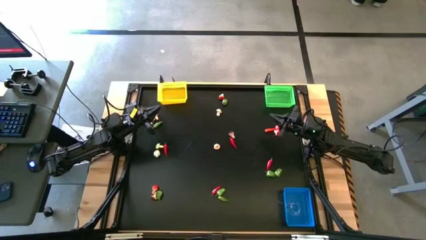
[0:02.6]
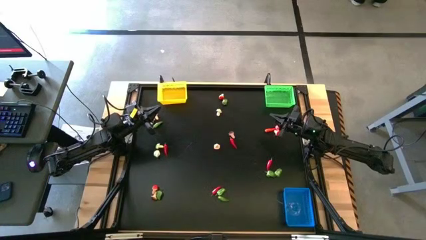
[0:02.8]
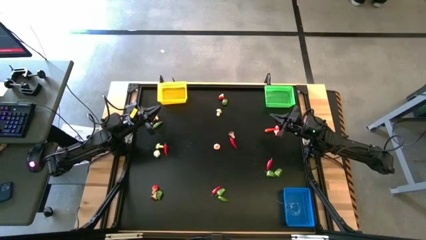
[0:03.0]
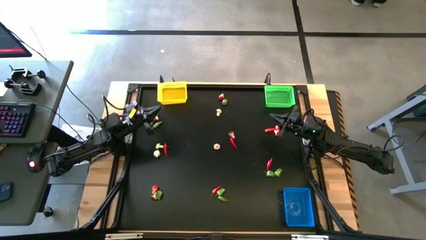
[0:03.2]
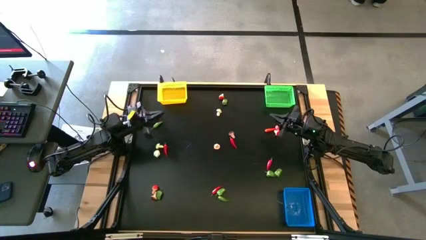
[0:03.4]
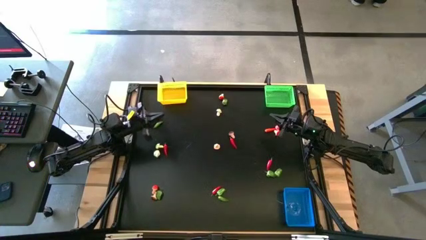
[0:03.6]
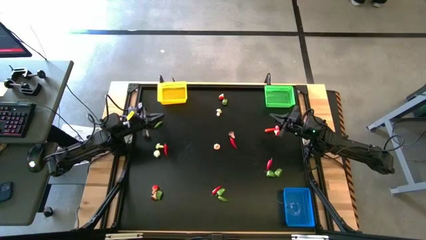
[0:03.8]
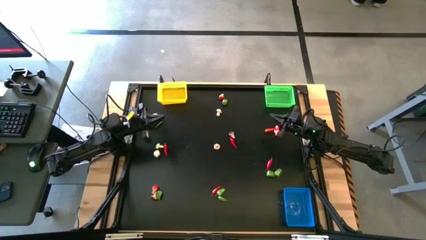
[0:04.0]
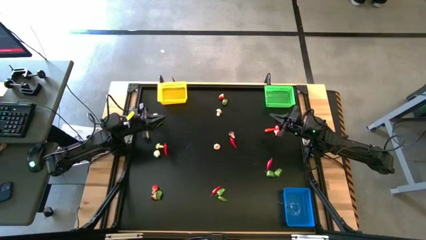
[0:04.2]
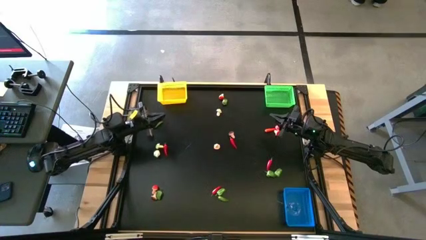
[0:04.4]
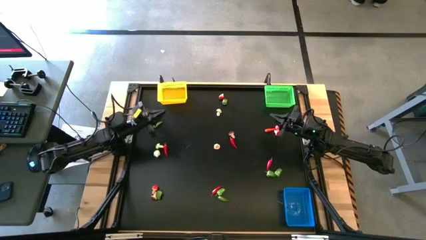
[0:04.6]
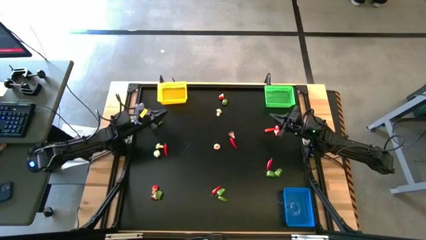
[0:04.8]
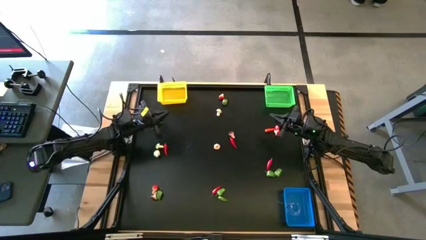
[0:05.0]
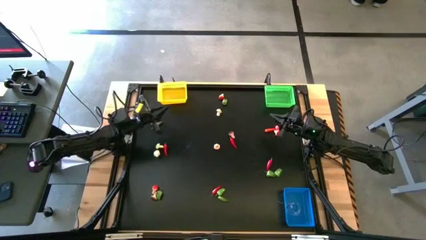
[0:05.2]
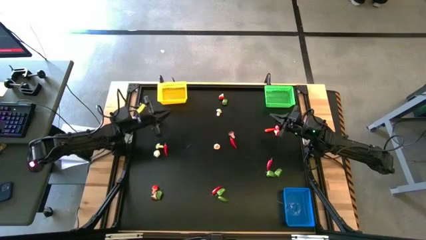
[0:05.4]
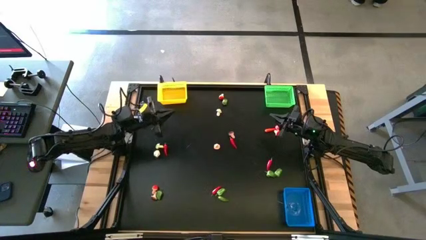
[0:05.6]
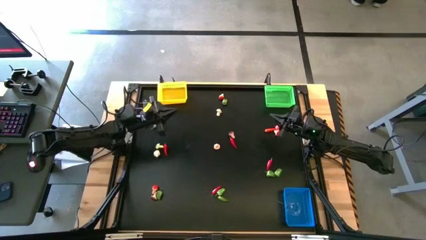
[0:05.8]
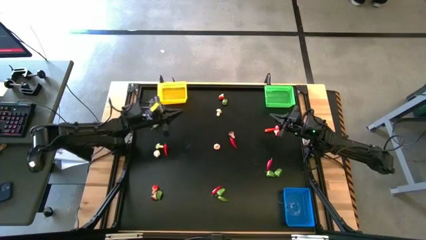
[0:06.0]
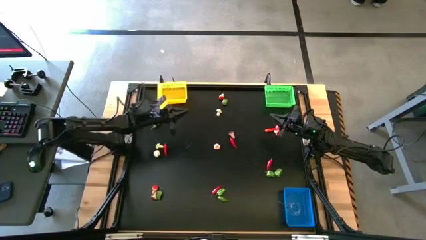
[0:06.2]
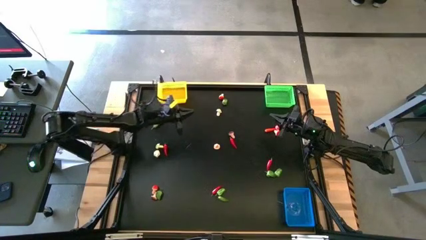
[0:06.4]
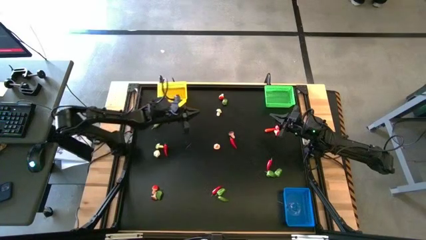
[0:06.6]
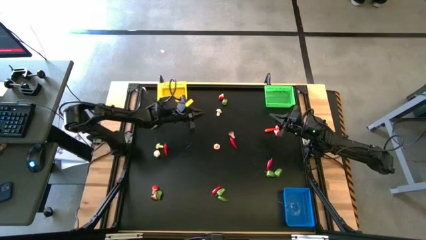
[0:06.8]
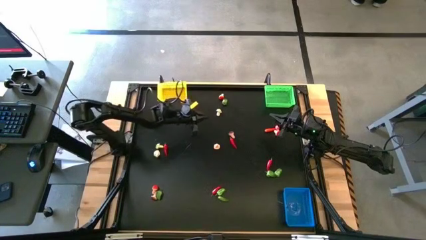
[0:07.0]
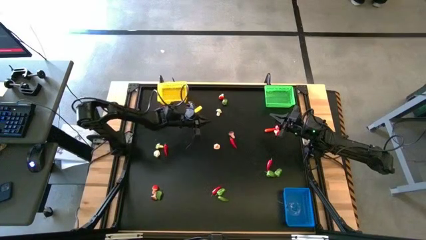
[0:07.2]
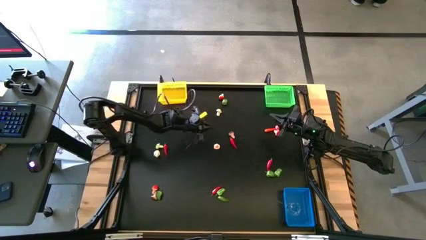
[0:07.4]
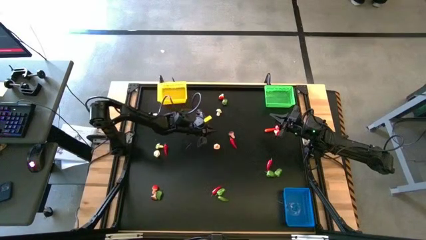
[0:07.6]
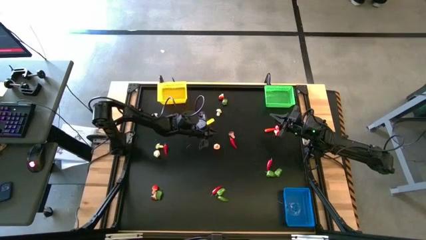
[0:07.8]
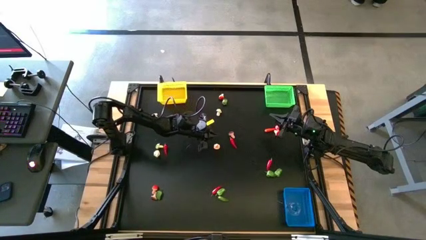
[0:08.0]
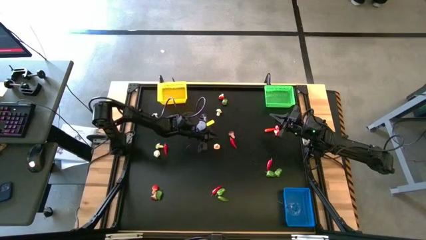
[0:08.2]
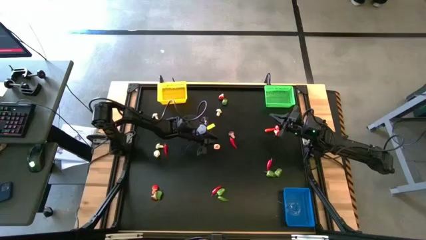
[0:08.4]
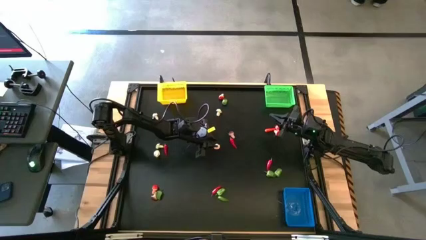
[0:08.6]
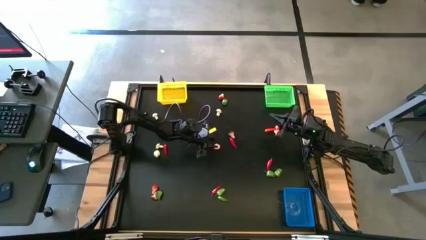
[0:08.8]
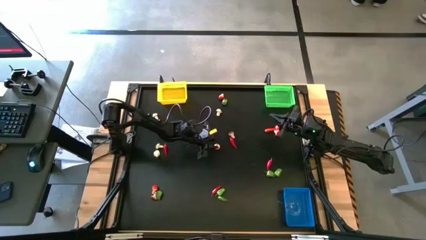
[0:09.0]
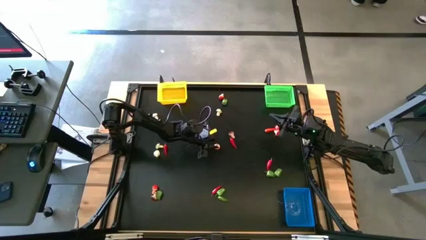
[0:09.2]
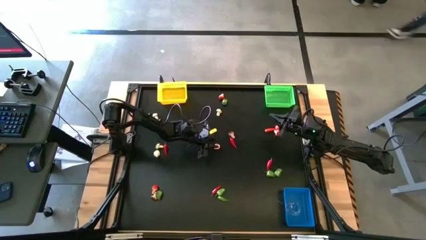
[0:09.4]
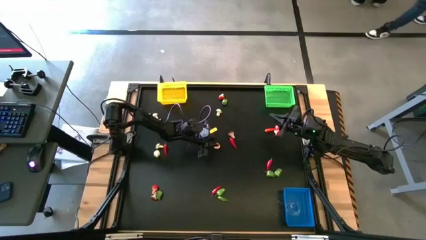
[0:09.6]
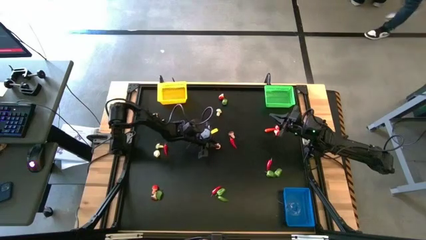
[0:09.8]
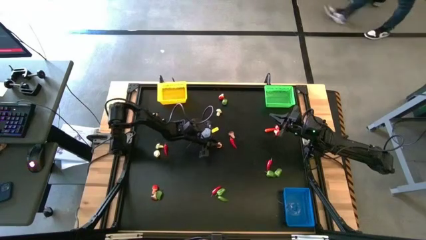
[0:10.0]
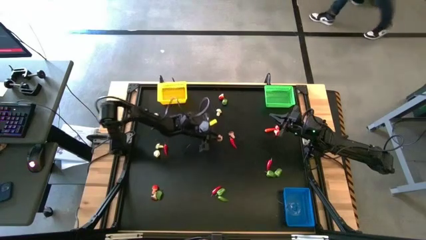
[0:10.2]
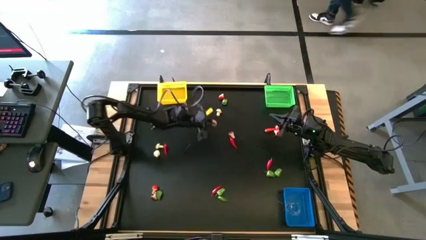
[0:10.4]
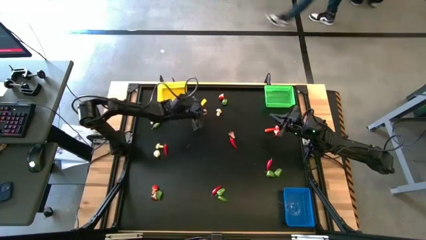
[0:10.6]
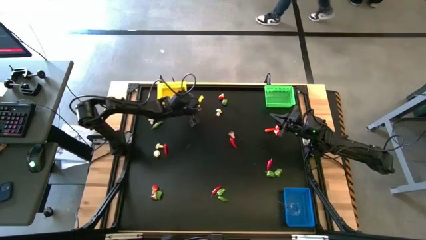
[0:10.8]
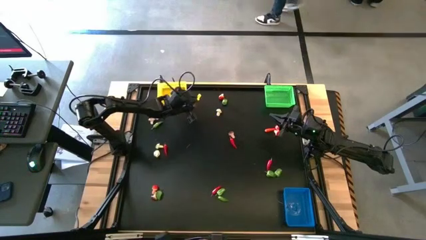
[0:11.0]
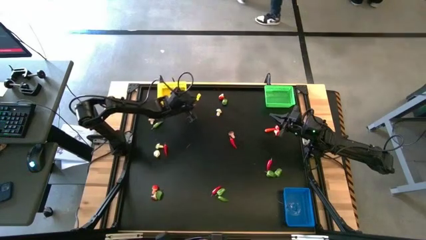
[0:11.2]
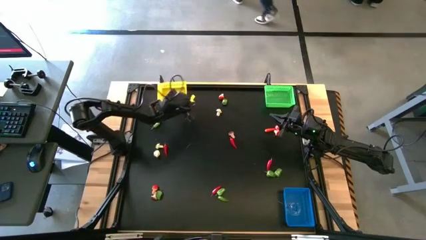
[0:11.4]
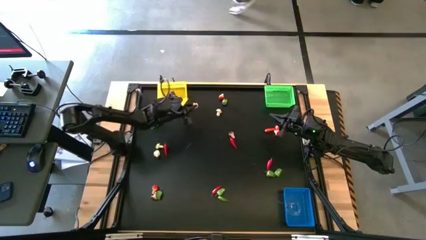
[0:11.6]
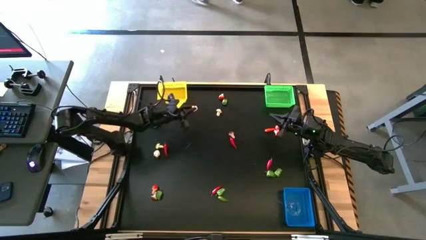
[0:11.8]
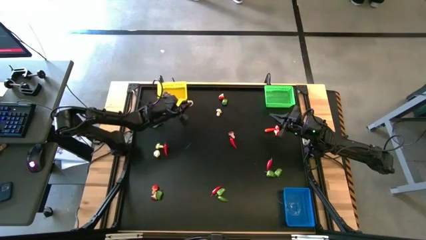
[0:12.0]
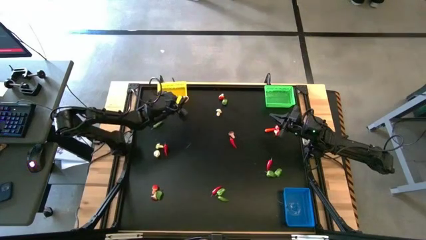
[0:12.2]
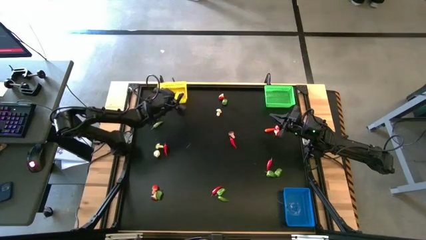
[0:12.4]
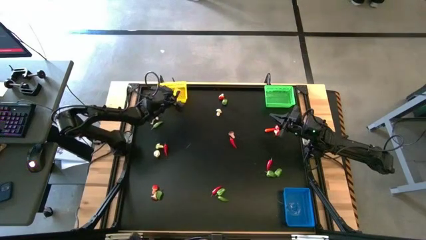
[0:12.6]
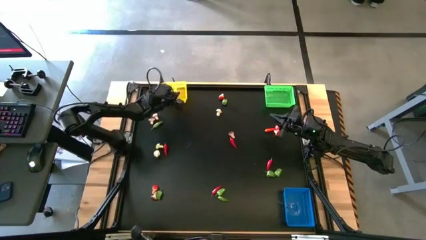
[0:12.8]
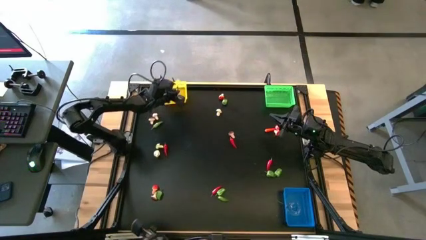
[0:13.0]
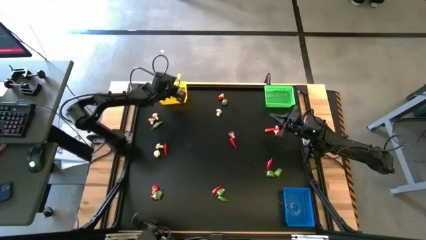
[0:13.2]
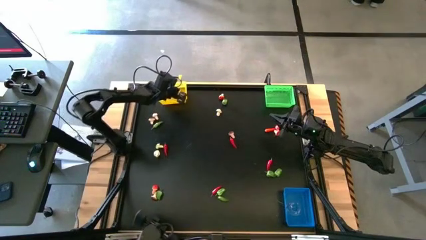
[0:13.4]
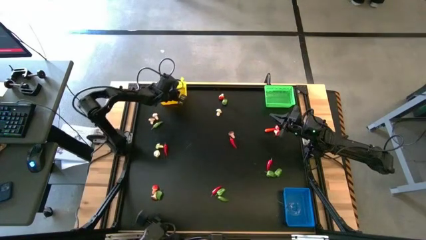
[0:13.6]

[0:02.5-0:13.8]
Task: Sort produce into baskets
Put the brown mushroom into the yellow bin

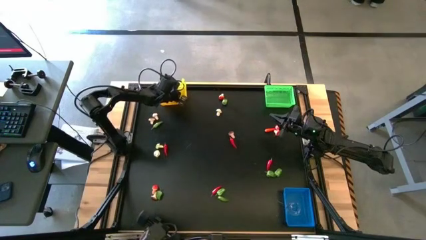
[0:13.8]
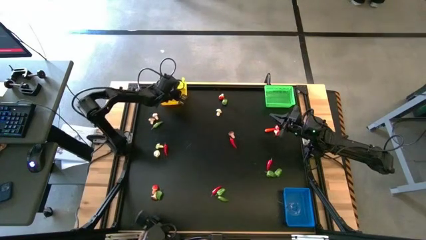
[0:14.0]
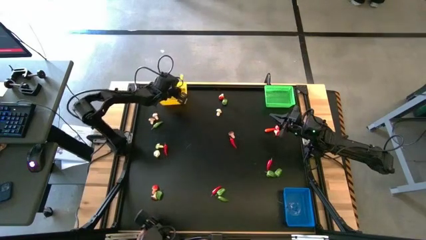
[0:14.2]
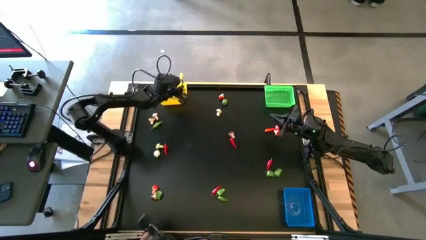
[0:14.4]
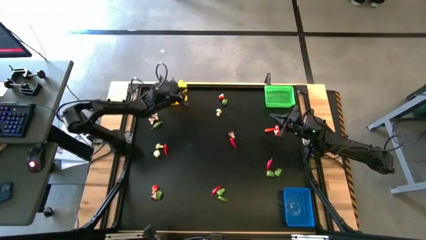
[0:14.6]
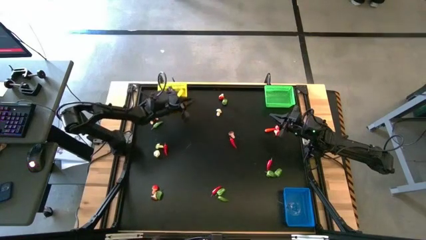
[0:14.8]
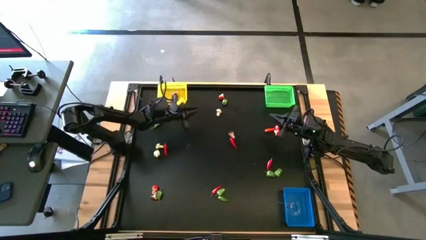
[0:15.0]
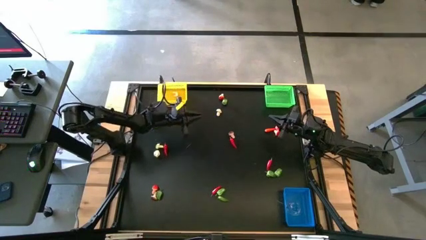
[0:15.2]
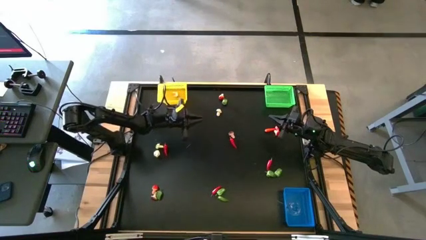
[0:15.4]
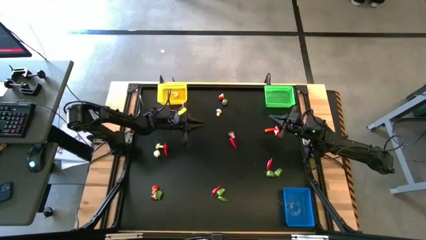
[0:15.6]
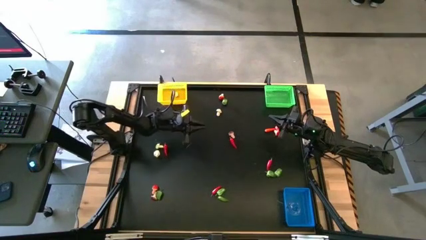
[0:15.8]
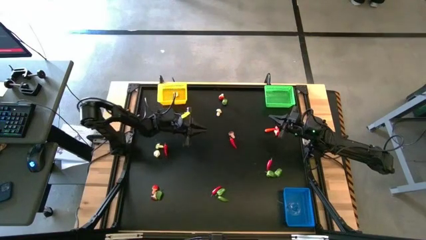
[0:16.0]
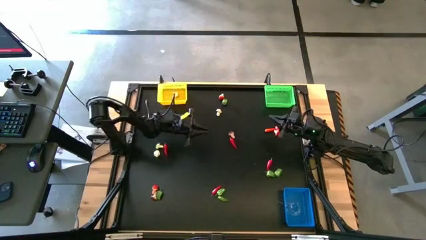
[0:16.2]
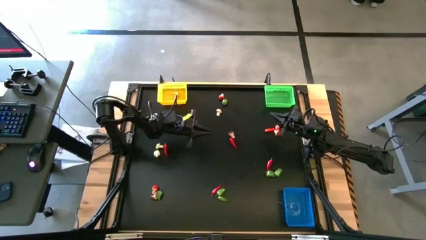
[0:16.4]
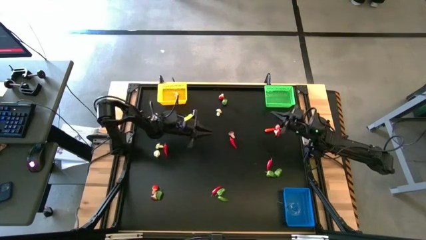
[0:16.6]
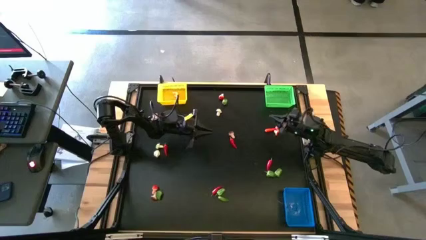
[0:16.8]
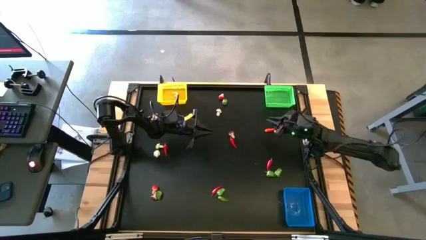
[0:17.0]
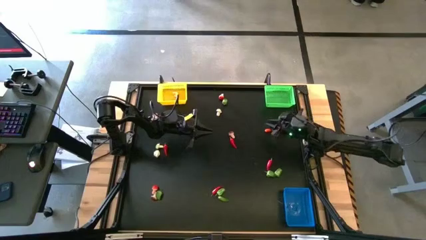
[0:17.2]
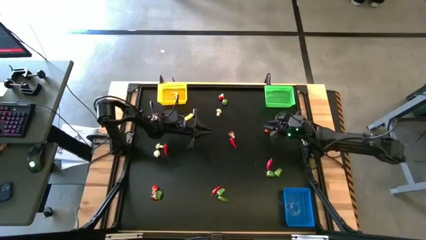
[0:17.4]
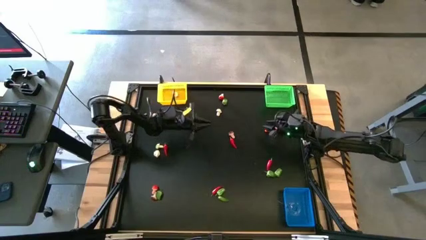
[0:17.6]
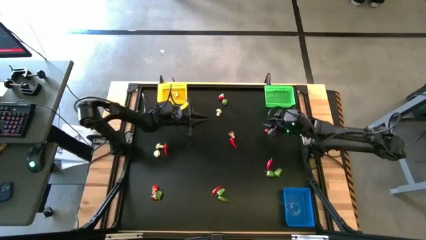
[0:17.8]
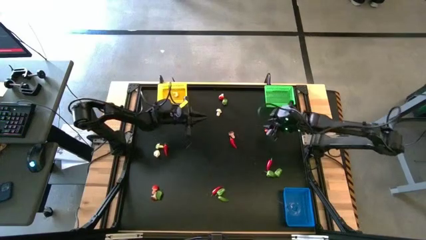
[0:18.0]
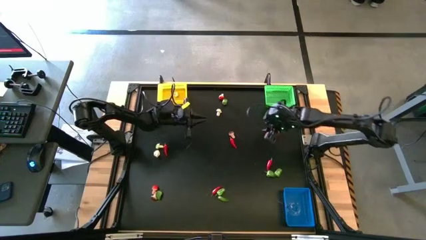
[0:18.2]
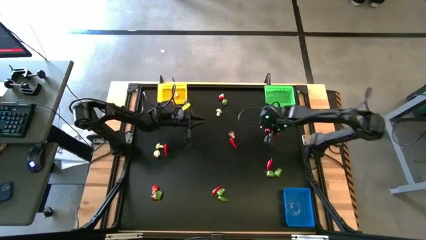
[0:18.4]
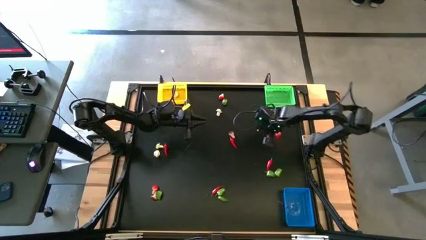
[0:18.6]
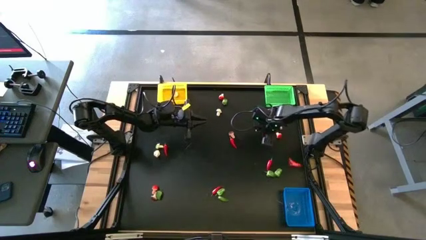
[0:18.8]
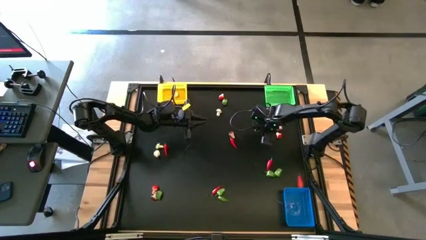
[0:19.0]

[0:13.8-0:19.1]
Put the orange chili pepper into the green bin
